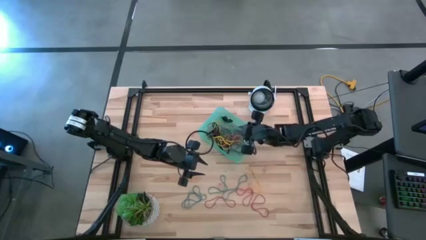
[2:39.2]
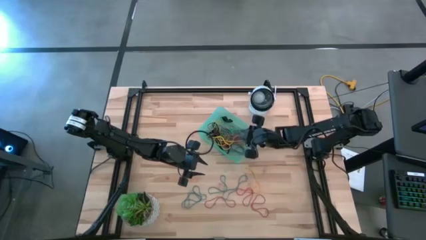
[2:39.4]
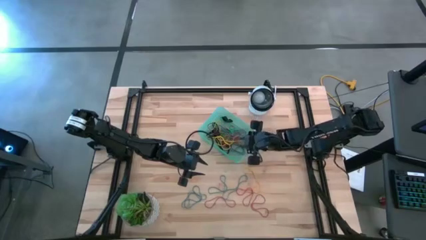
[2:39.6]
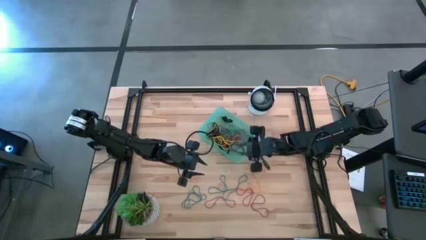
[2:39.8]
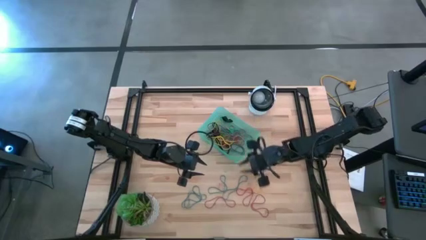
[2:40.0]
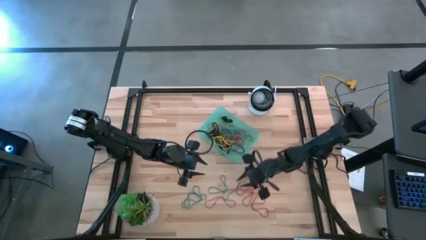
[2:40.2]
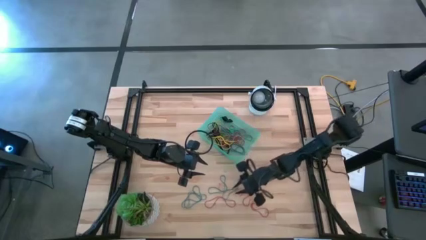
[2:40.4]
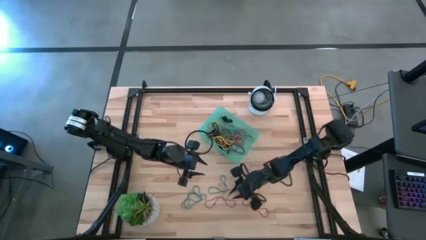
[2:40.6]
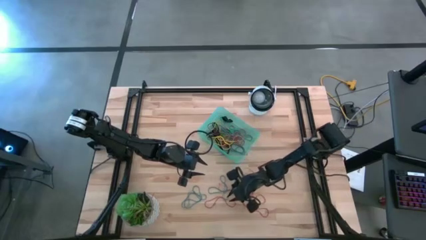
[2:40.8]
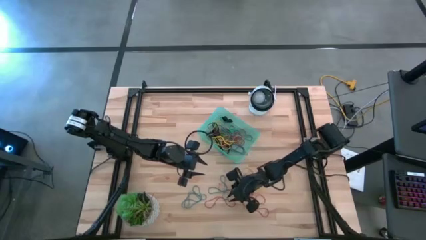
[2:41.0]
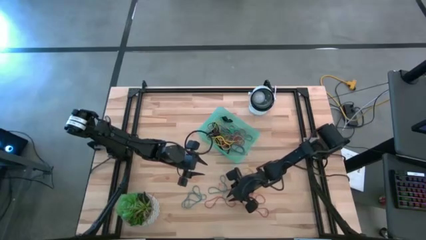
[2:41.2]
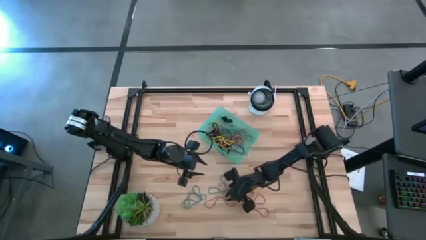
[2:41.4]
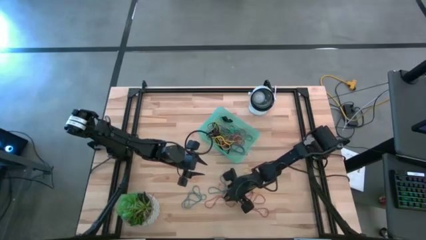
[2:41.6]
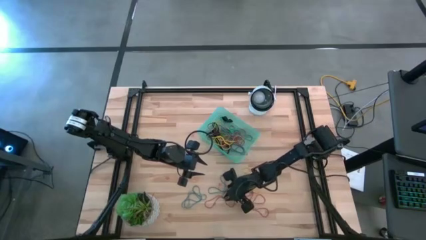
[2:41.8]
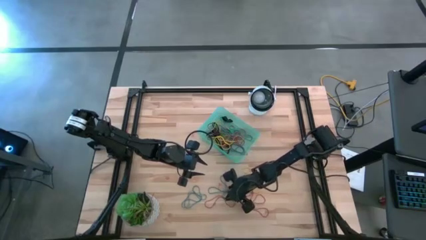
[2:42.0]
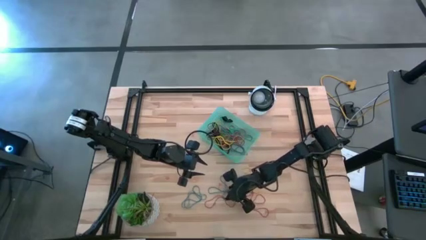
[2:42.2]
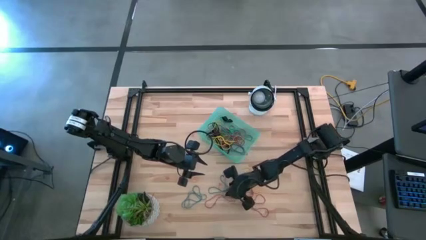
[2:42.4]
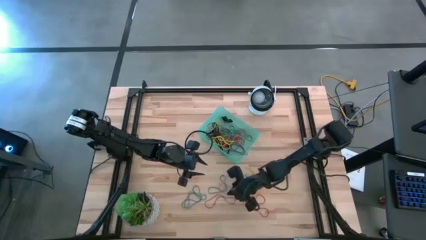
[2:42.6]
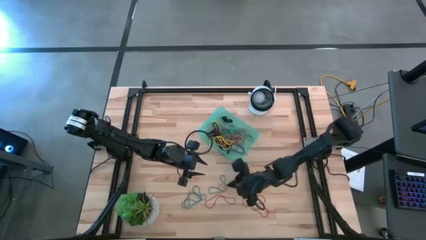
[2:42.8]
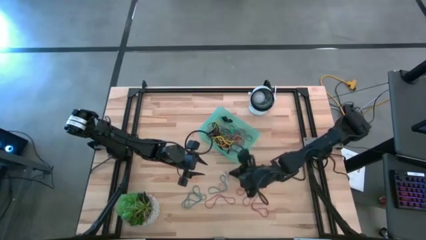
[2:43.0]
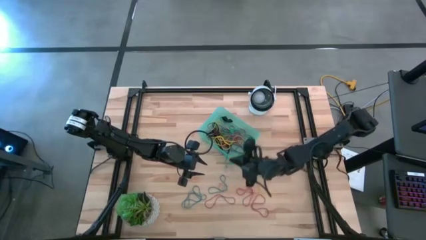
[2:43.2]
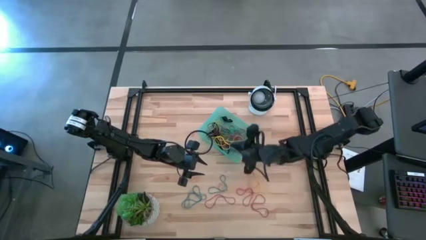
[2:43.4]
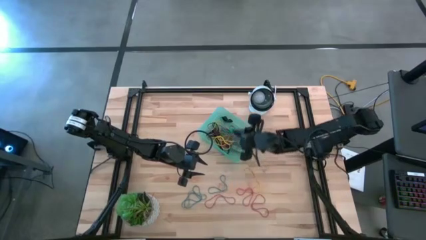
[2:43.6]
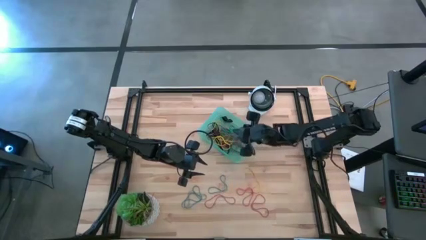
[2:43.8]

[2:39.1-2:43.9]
Task: Pick and place rubber bands into bin
Put the blue rubber band into the blue bin

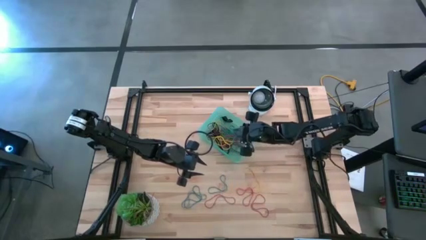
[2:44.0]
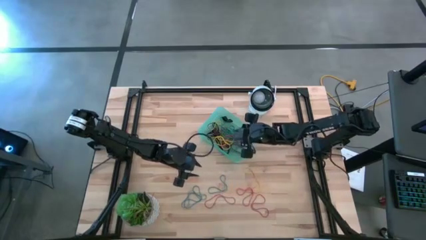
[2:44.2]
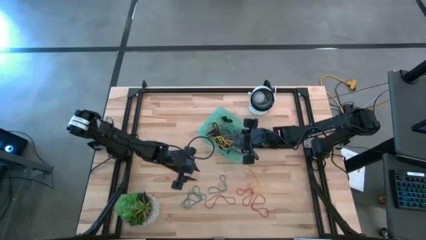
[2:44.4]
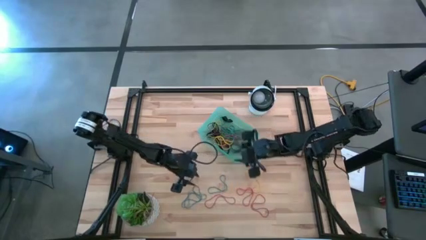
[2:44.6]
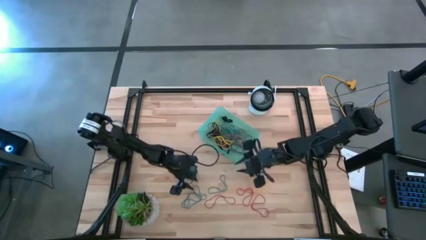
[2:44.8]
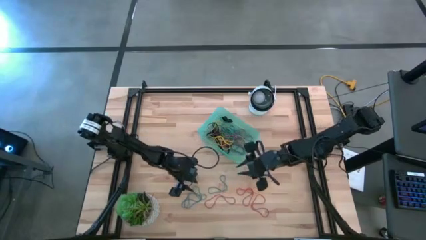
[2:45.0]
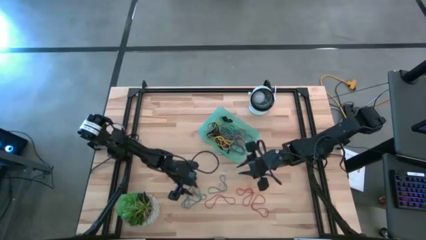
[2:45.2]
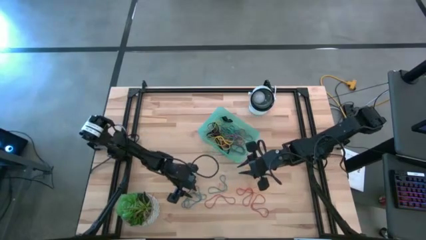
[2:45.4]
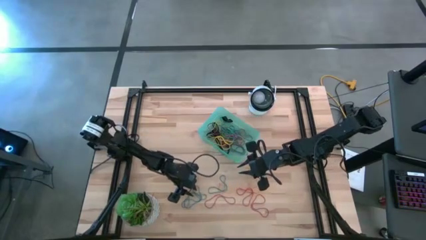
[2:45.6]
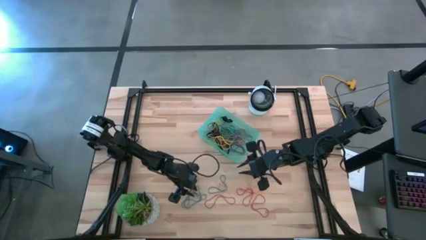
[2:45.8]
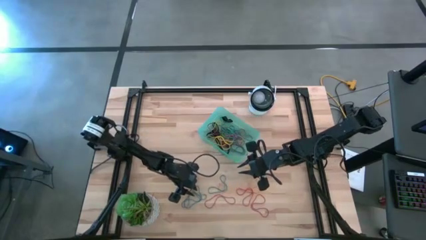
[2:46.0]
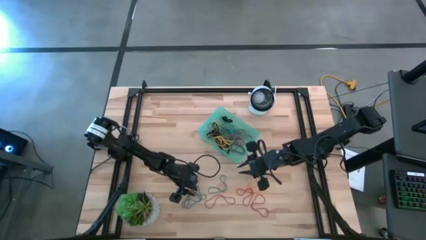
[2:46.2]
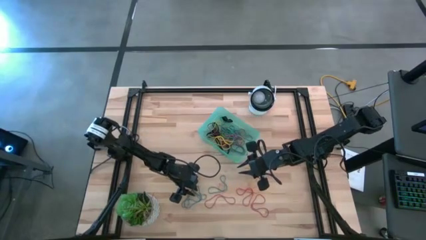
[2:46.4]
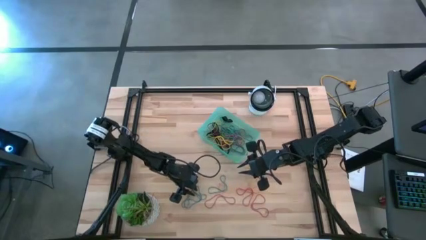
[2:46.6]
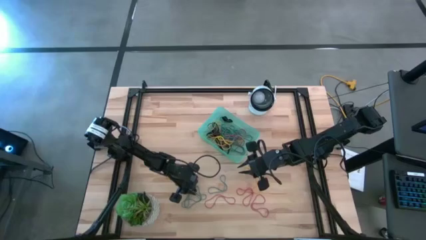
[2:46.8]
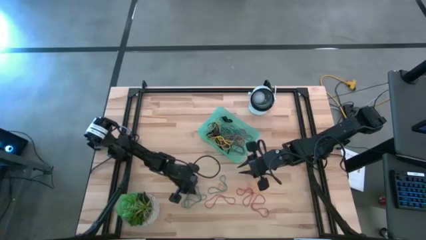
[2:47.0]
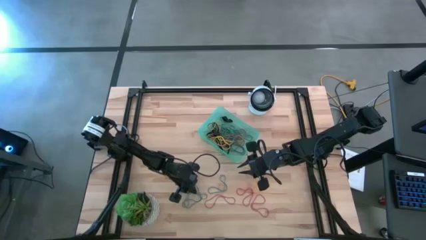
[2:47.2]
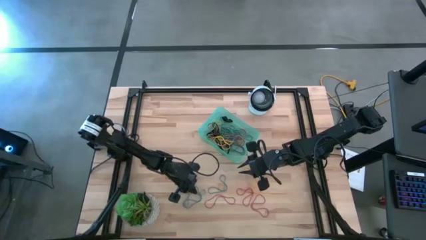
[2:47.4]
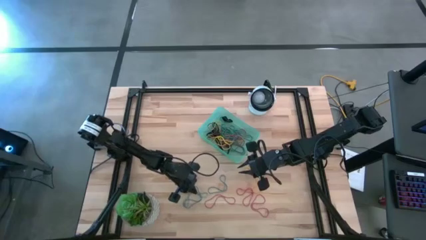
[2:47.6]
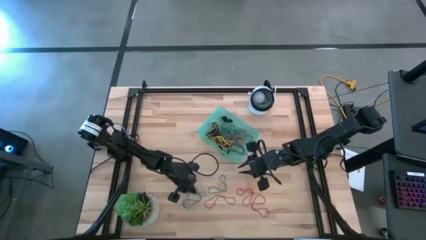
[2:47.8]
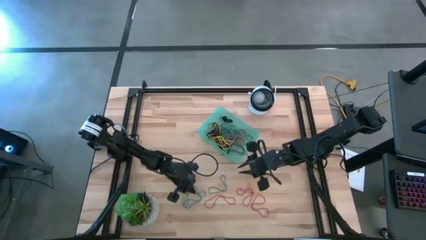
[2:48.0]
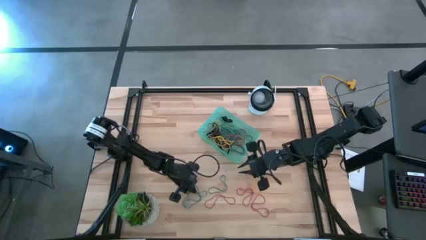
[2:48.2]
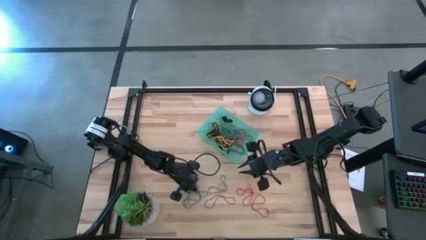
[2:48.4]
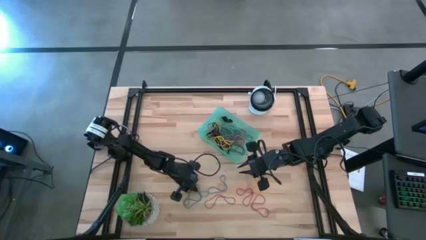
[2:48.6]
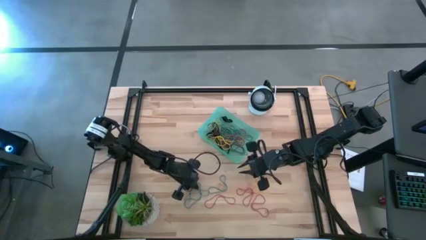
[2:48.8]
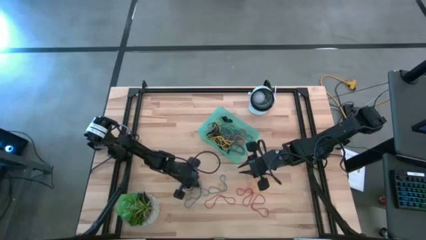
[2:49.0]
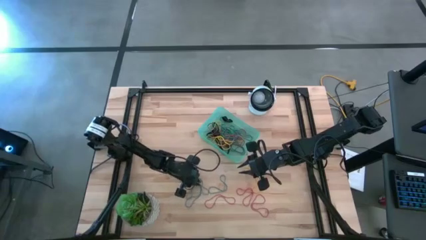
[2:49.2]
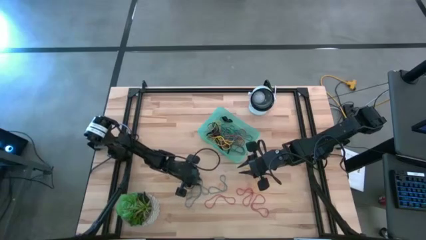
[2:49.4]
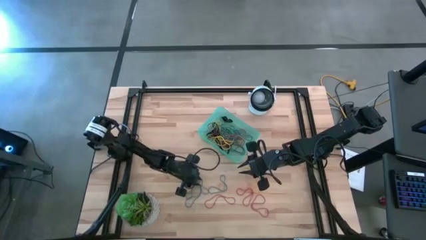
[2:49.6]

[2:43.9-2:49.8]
Put the blue rubber band into the blue bin

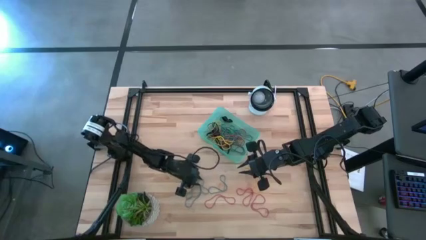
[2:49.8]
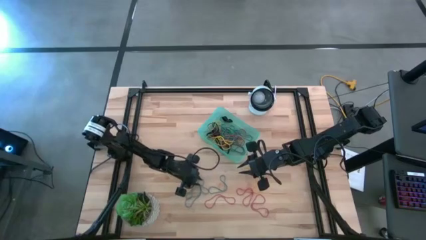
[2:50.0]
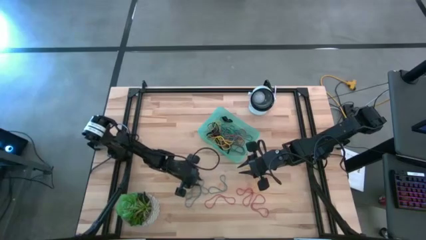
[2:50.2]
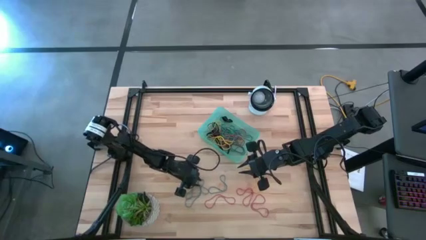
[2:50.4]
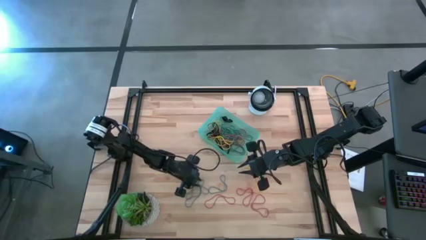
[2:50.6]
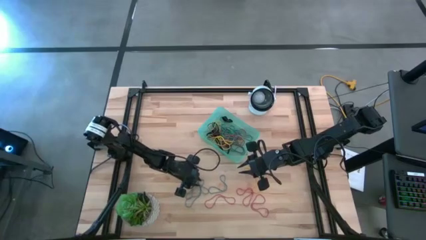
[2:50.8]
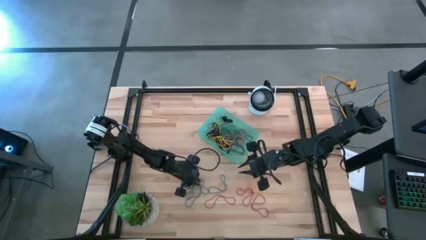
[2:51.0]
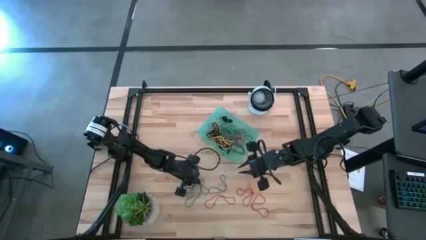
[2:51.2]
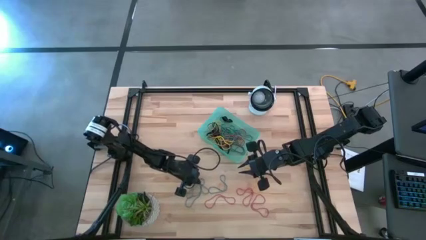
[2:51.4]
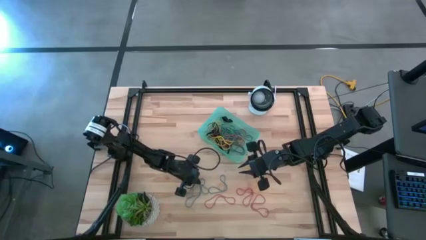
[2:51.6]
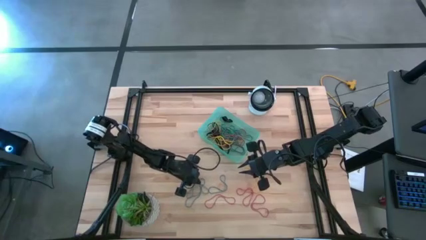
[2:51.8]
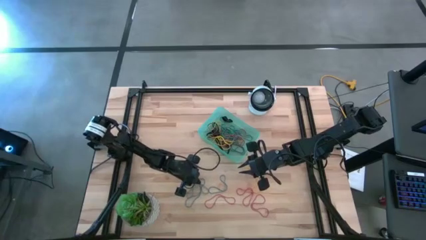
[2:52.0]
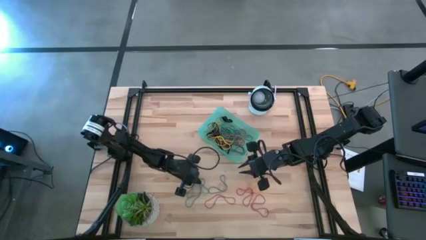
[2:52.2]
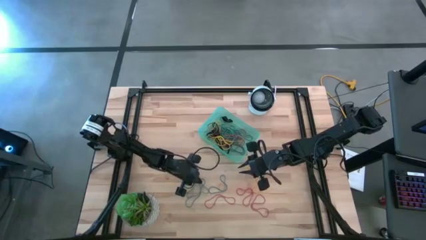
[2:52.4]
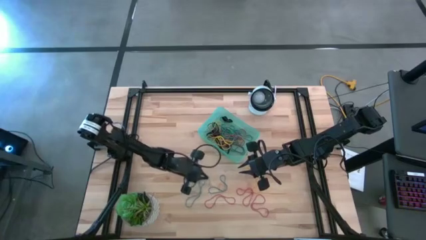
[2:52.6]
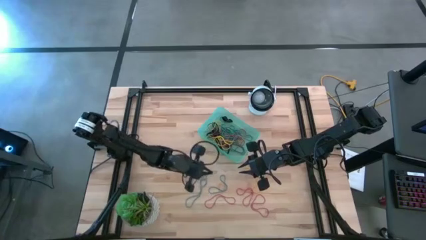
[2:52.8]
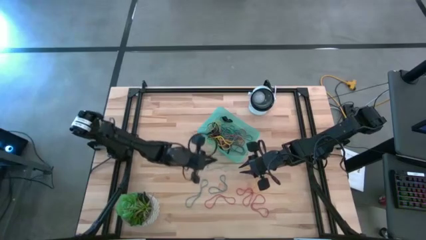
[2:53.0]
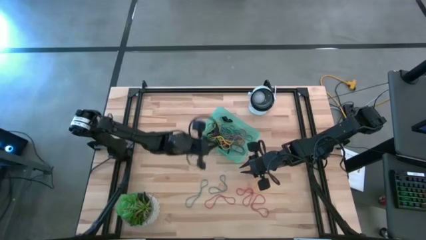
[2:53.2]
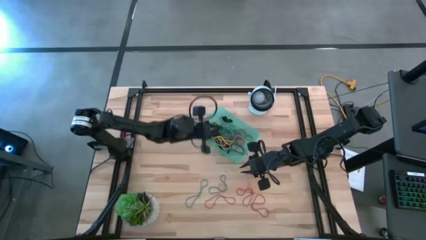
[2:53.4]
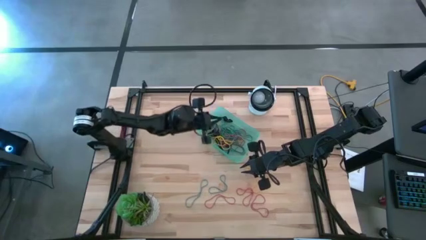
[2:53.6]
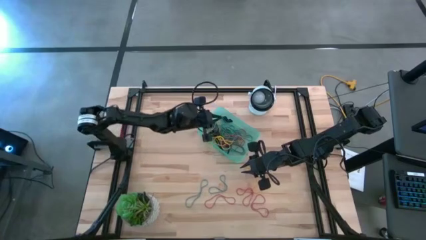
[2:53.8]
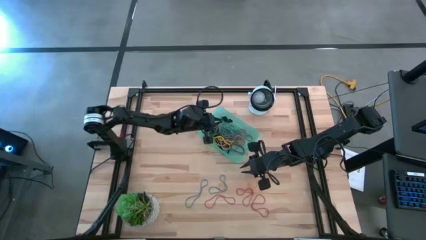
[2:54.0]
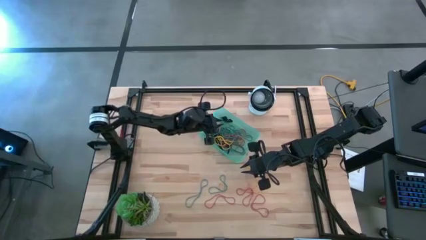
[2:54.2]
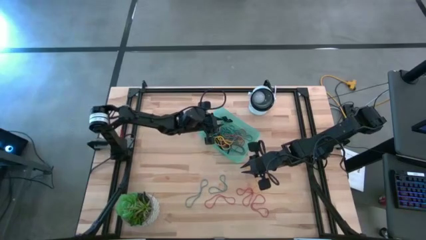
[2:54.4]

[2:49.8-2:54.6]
Put the blue rubber band into the blue bin

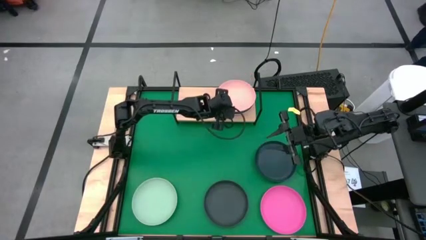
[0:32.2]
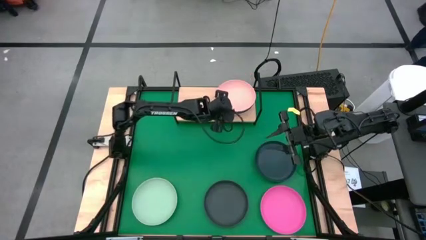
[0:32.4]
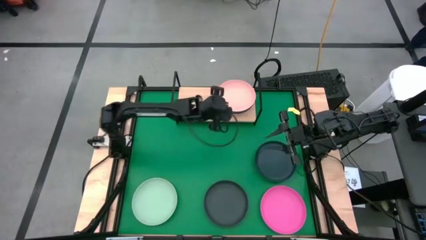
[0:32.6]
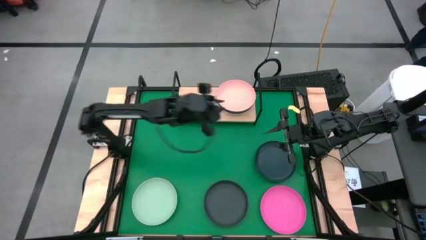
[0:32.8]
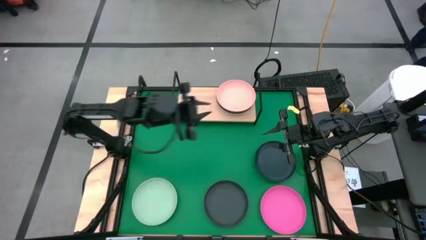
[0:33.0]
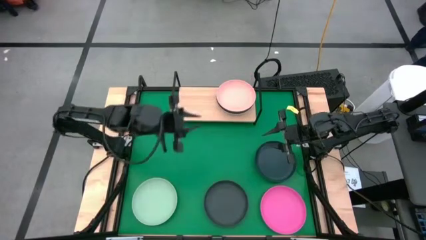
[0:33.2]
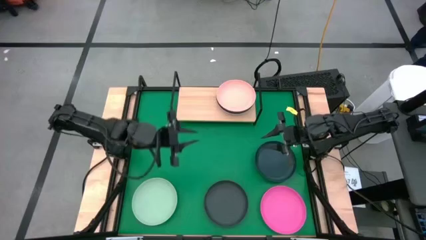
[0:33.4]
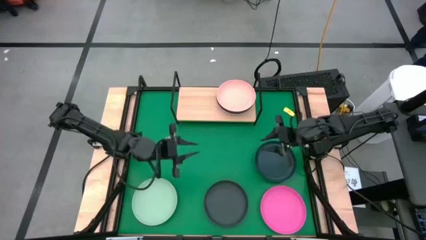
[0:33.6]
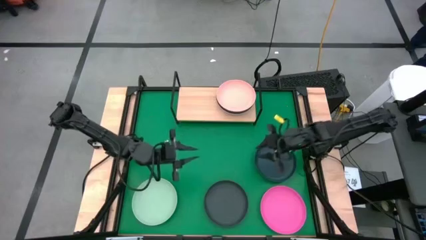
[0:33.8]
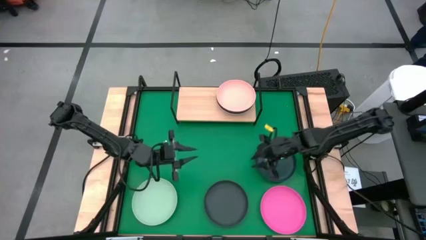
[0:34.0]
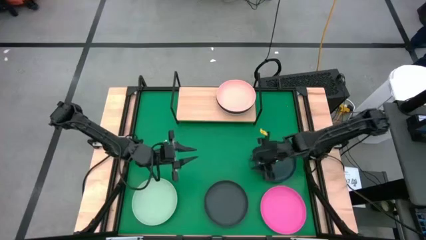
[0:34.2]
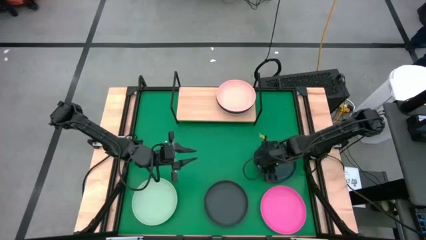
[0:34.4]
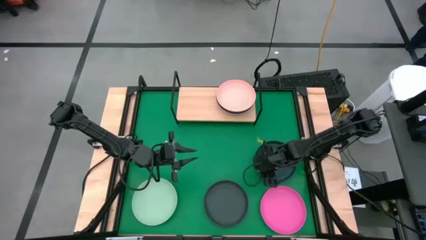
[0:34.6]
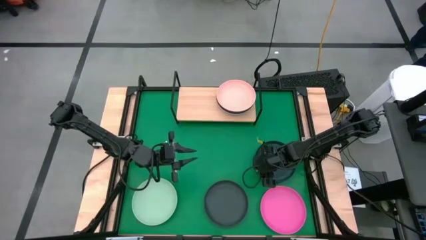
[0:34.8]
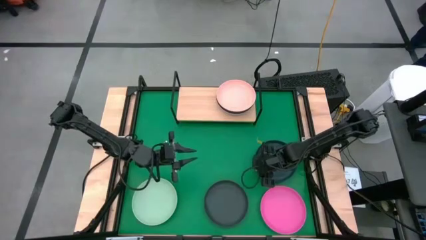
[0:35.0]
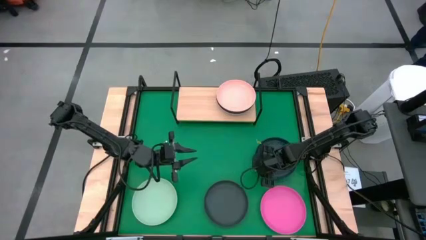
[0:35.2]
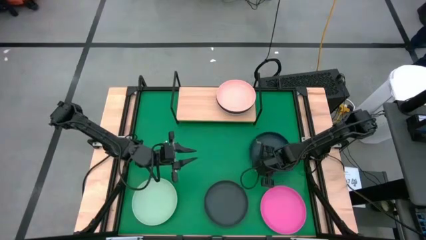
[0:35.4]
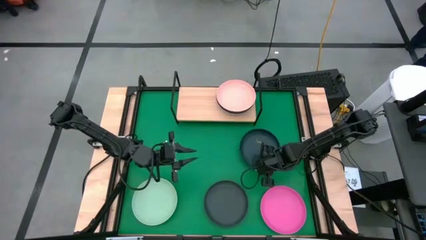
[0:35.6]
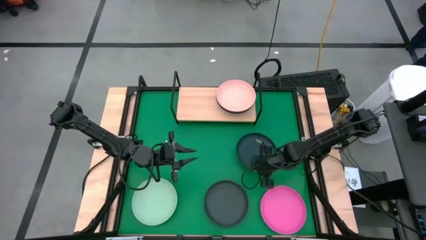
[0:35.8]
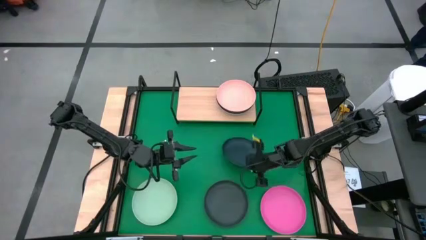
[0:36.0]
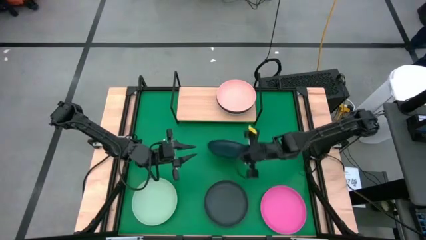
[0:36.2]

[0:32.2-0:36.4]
Task: Place and stack plates onto a shelf
Put the dark green plate on the shelf
